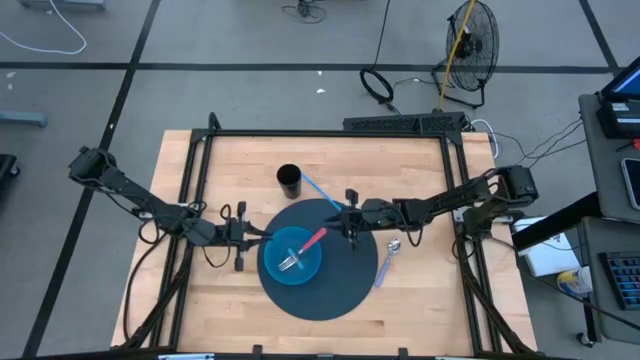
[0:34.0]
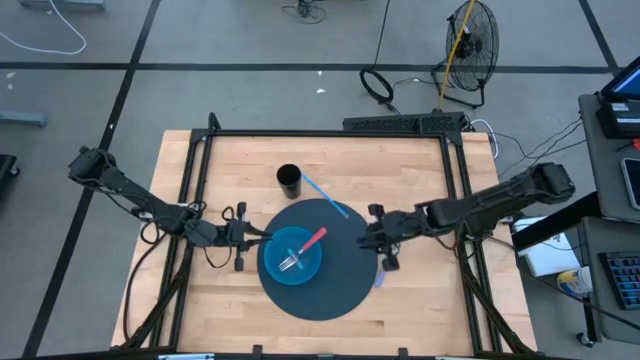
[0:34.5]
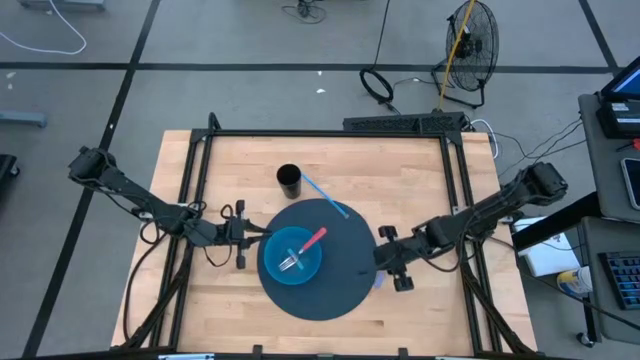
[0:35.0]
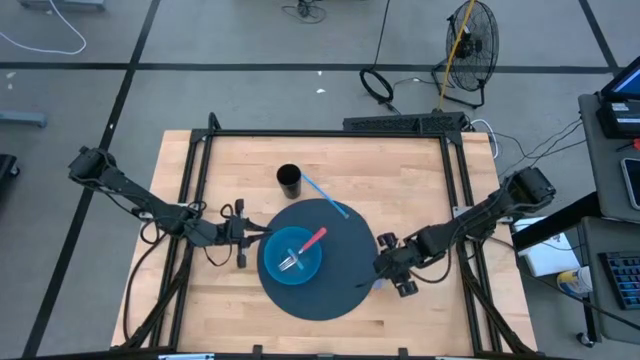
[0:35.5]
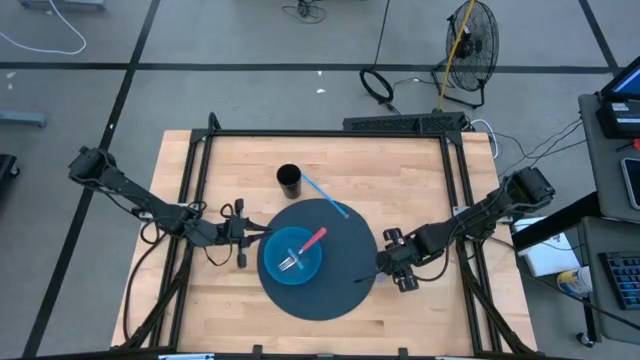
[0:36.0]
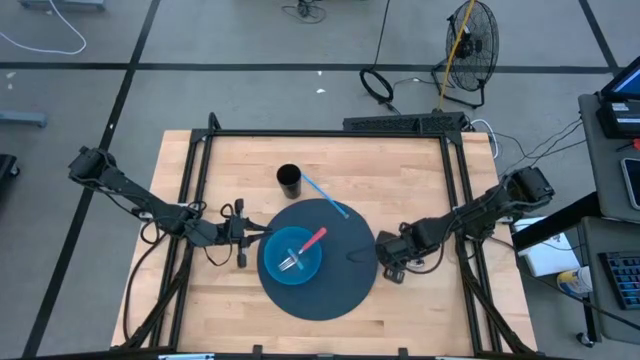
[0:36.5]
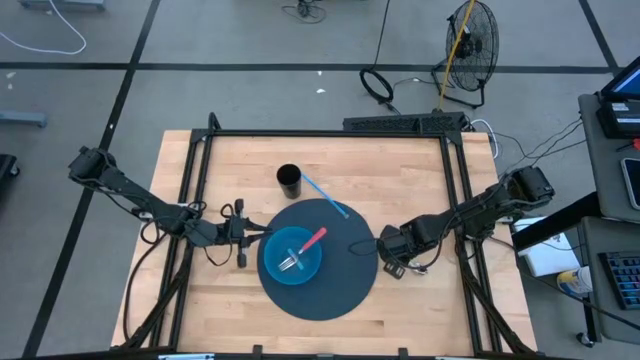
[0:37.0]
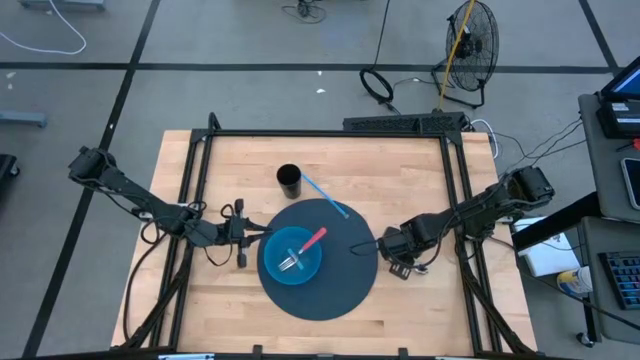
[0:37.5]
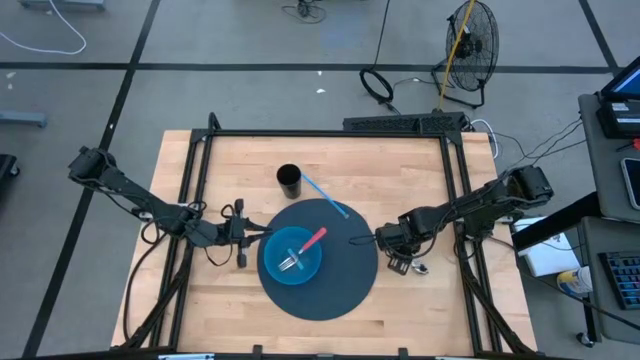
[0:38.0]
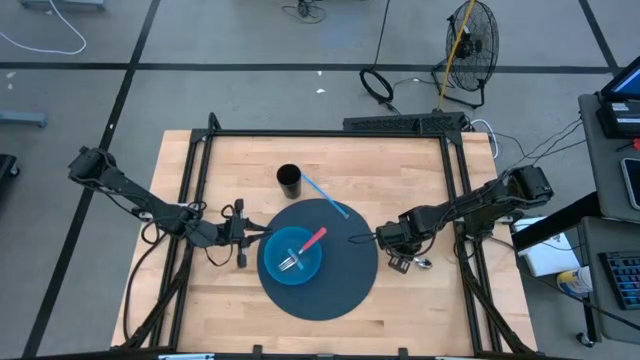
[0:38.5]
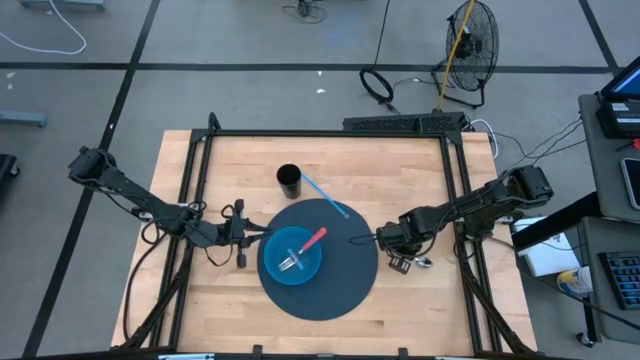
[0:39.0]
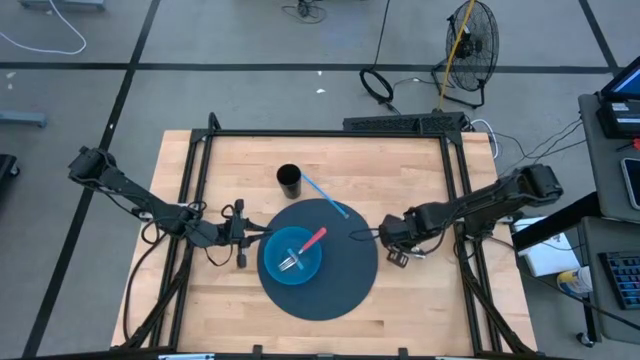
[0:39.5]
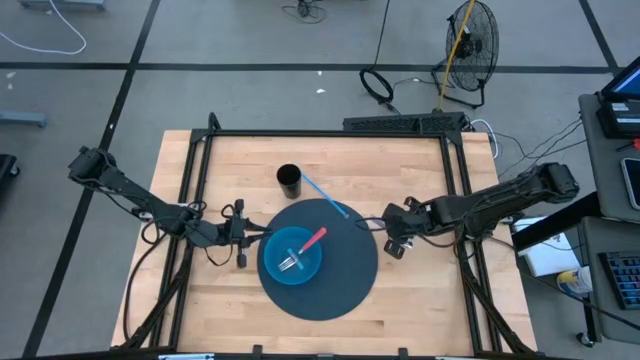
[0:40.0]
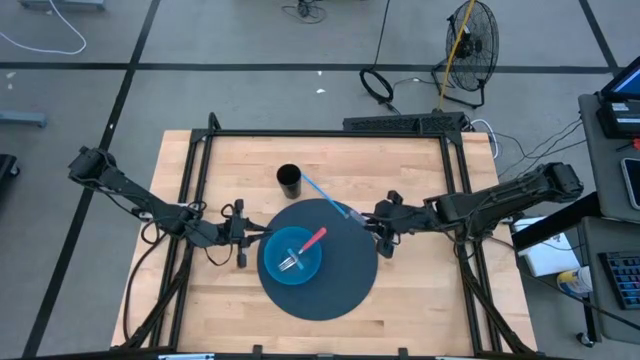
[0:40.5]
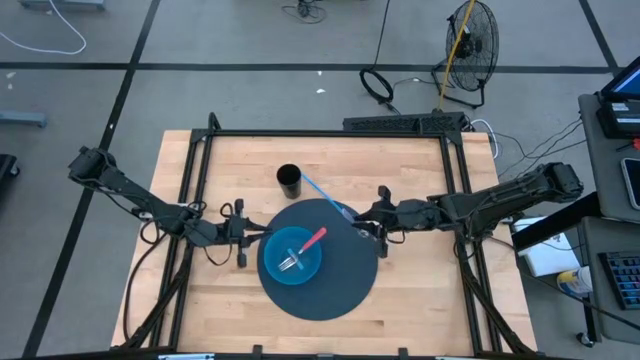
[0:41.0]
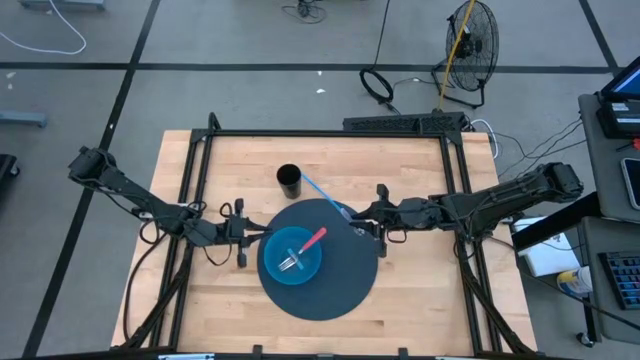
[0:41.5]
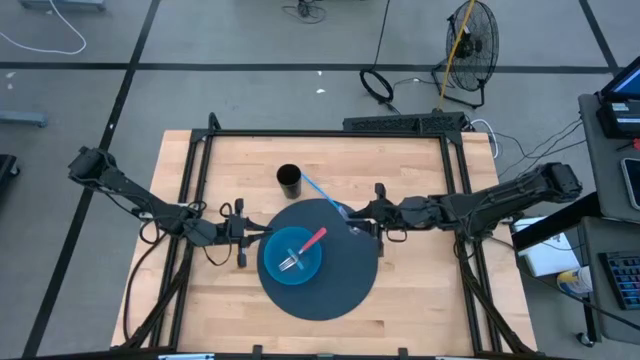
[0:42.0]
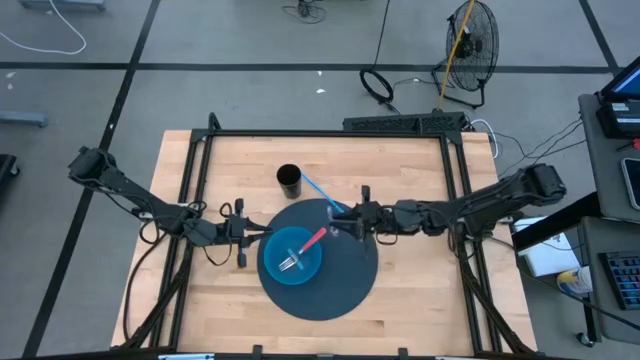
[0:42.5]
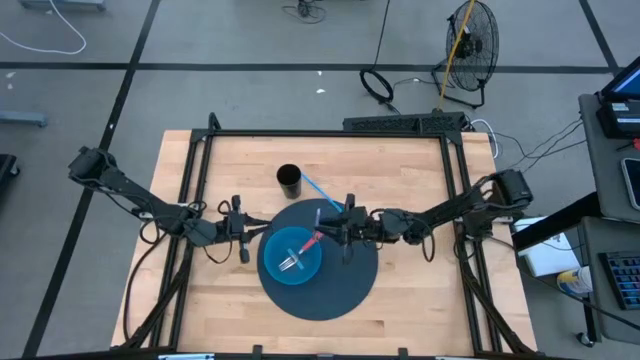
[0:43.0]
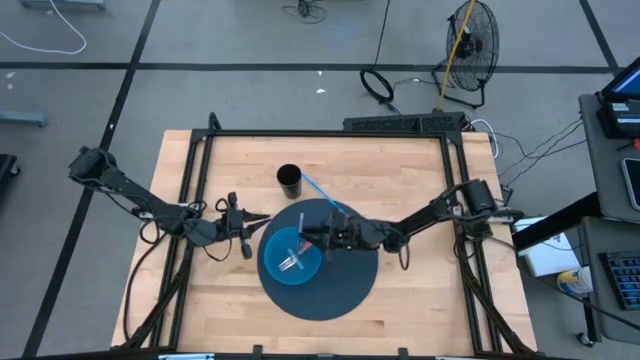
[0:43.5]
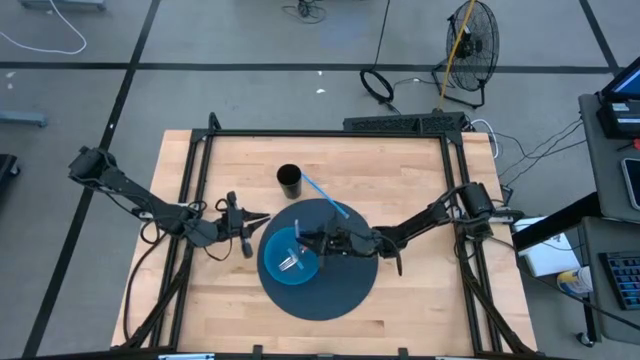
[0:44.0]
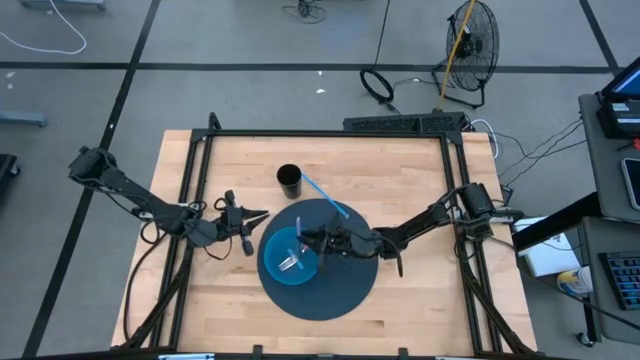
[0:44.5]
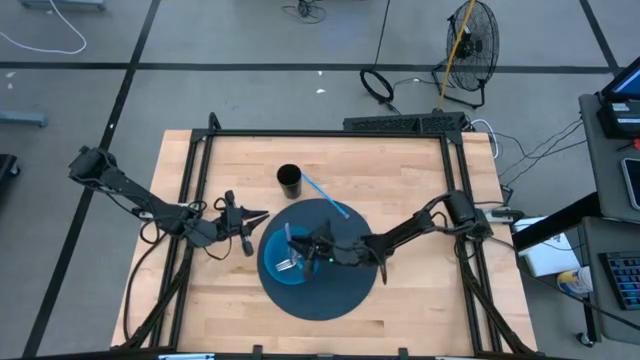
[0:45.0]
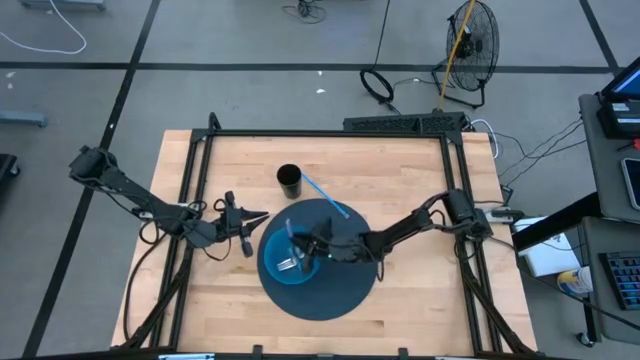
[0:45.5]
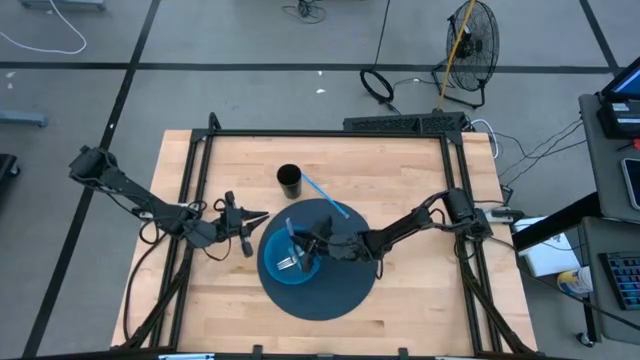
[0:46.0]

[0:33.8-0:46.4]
Task: Pick & Place Utensil
Put the purple spoon into the blue bowl on the blue mat

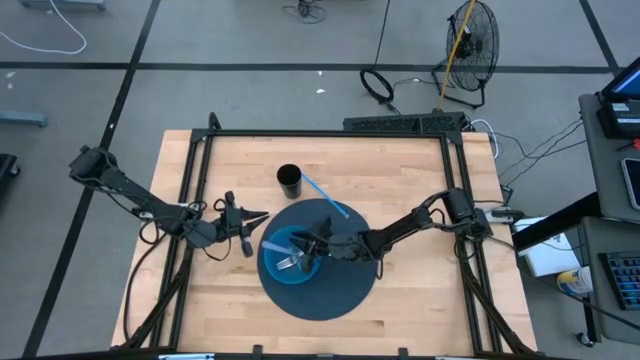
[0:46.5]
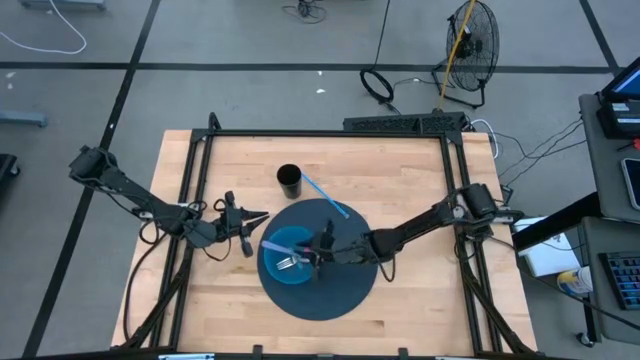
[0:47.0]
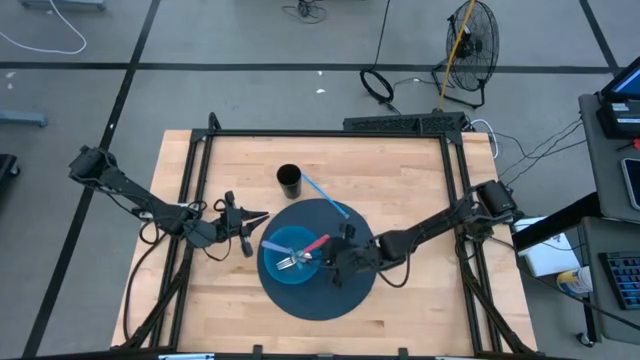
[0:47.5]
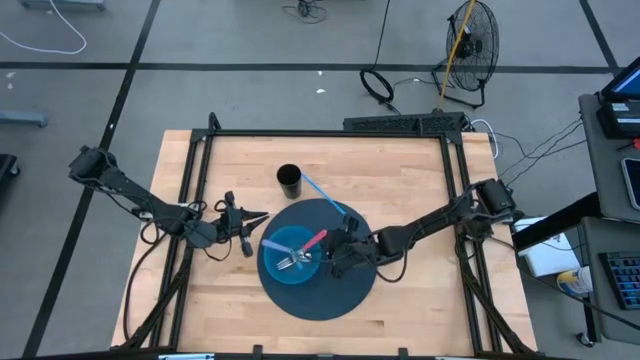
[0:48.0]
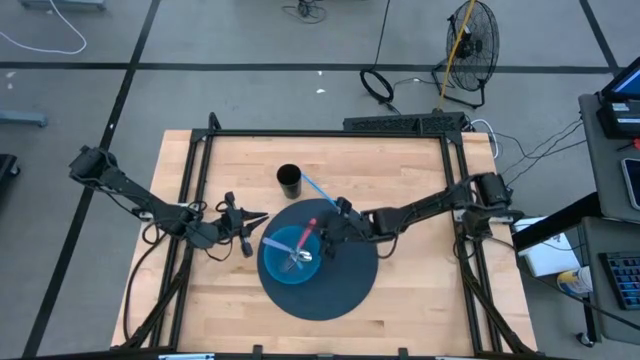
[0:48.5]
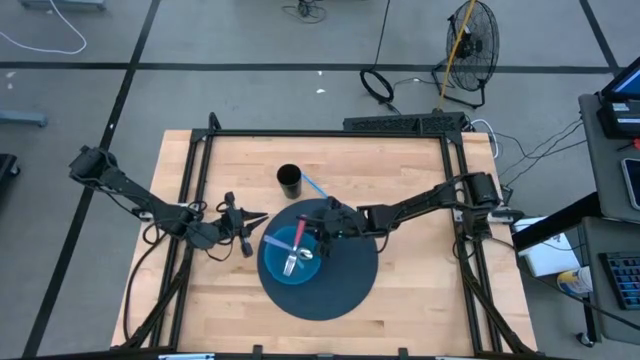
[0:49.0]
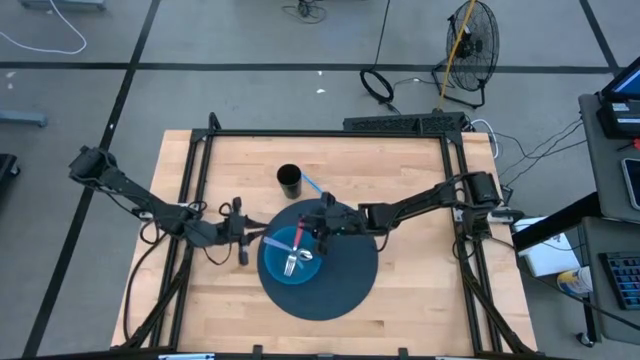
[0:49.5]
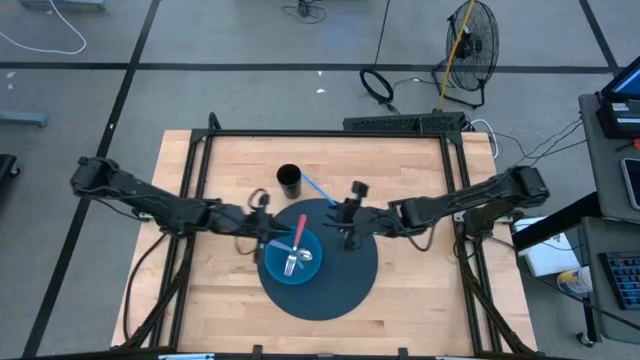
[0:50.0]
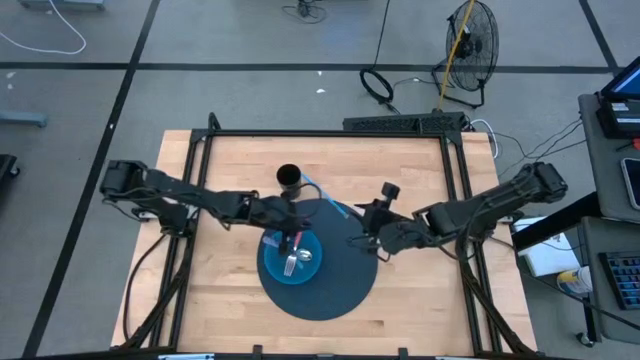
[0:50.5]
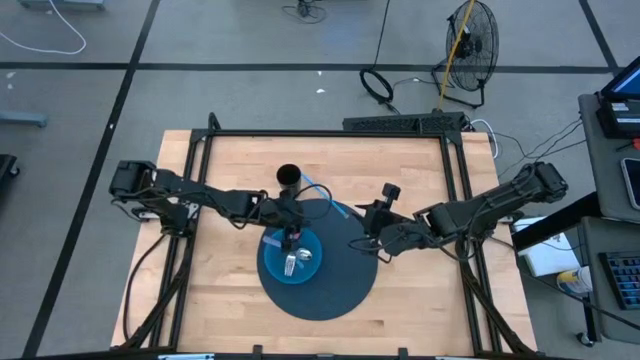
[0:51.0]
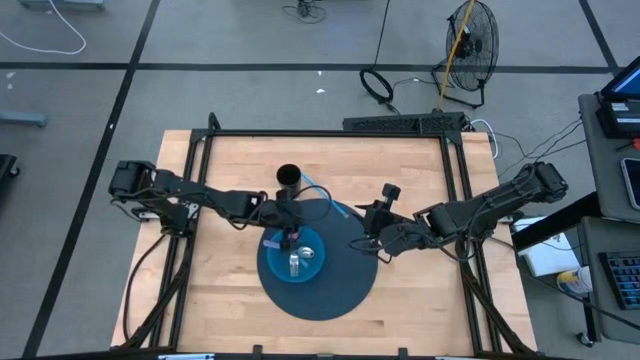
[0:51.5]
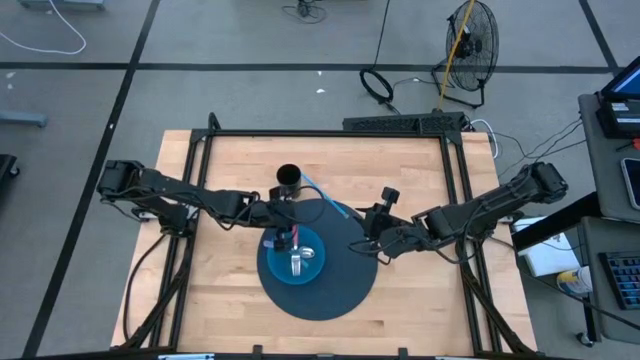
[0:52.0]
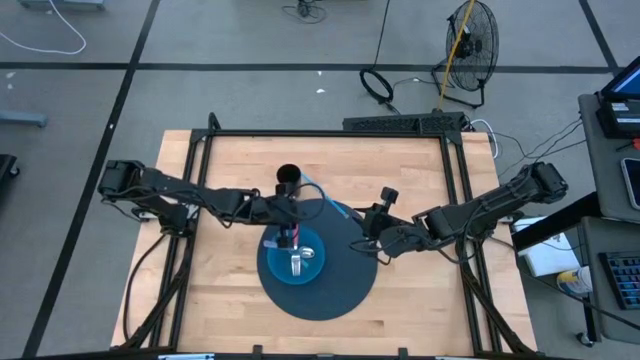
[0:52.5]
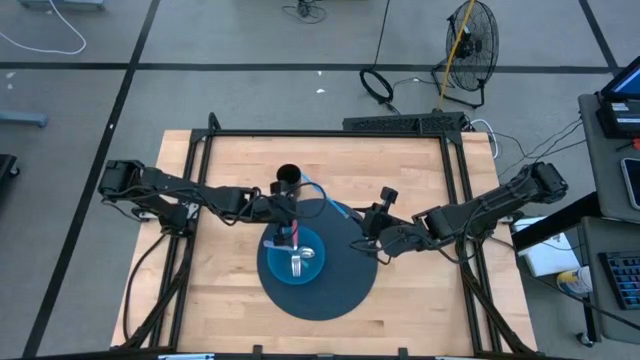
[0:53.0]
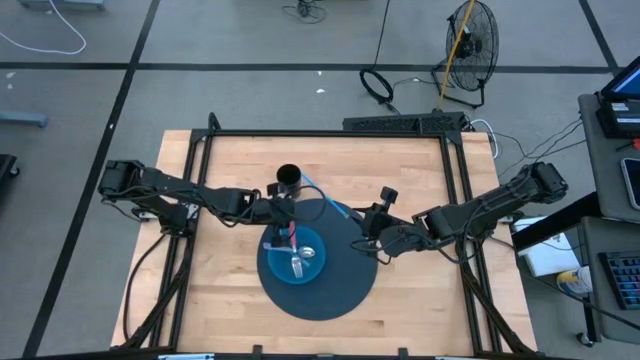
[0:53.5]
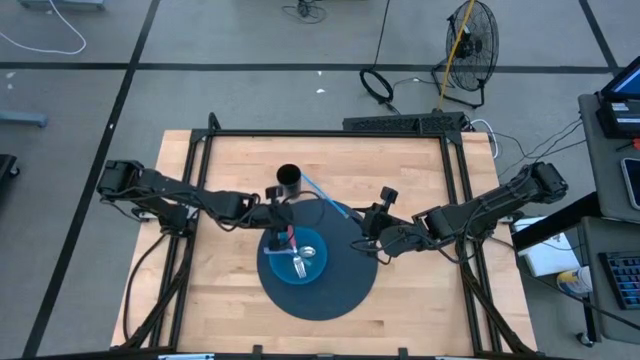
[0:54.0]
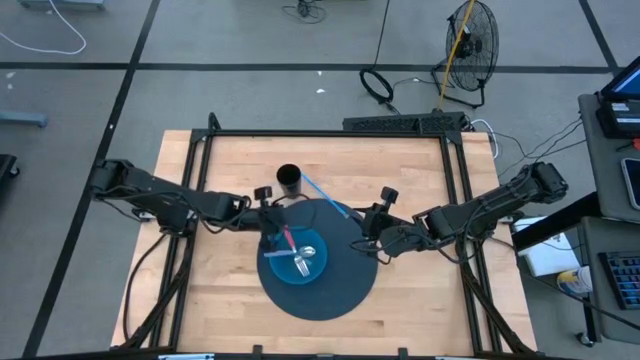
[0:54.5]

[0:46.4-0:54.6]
Adjust the pink fork in the blue bowl on the blue mat
